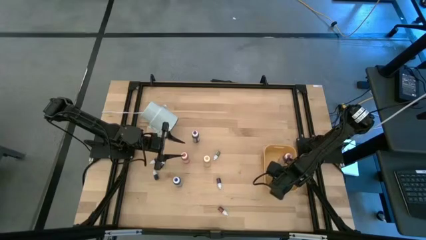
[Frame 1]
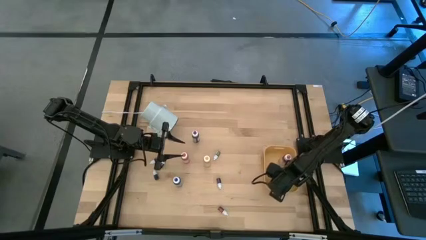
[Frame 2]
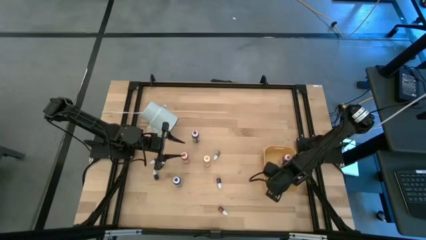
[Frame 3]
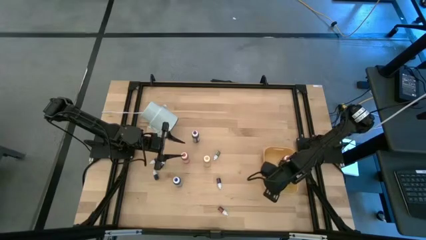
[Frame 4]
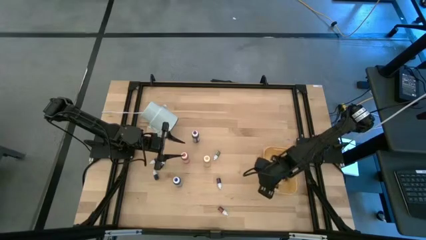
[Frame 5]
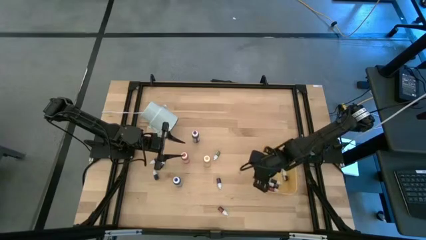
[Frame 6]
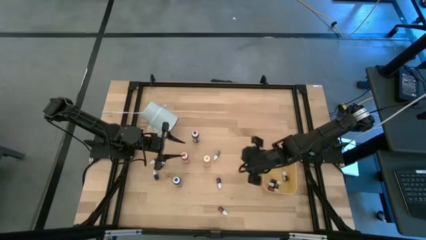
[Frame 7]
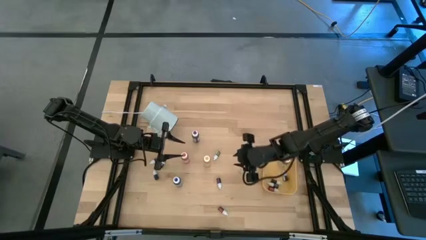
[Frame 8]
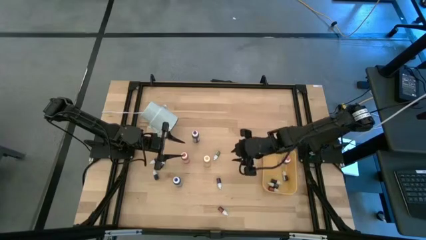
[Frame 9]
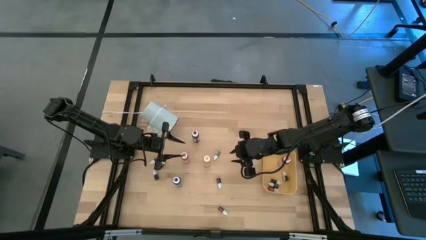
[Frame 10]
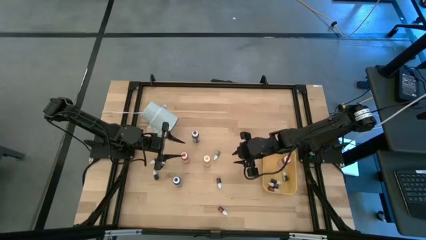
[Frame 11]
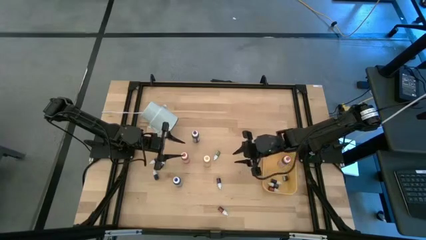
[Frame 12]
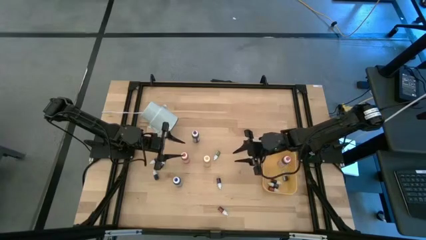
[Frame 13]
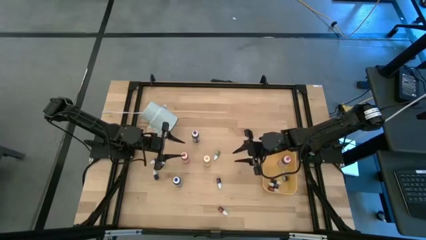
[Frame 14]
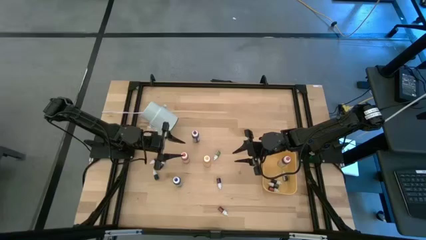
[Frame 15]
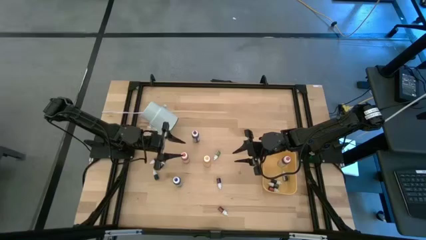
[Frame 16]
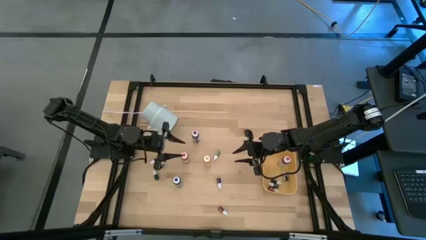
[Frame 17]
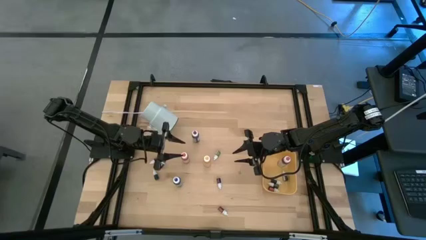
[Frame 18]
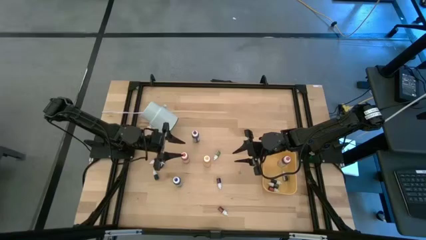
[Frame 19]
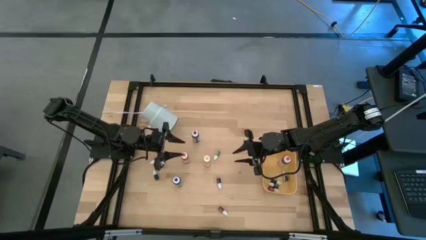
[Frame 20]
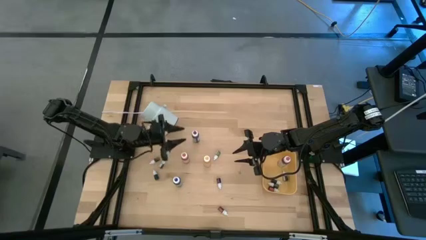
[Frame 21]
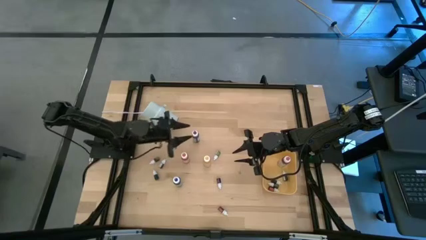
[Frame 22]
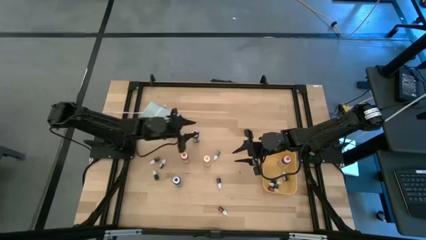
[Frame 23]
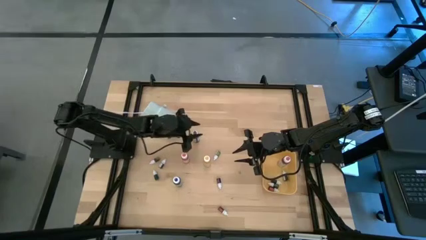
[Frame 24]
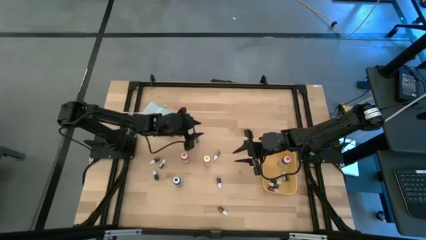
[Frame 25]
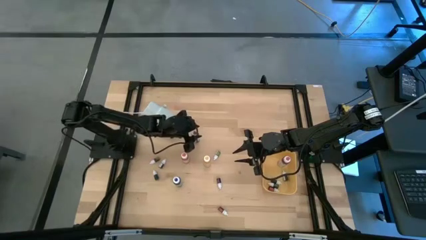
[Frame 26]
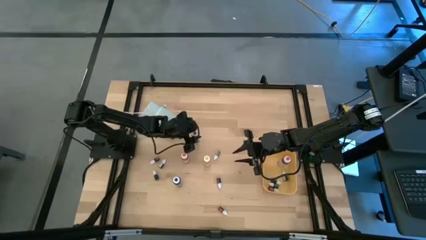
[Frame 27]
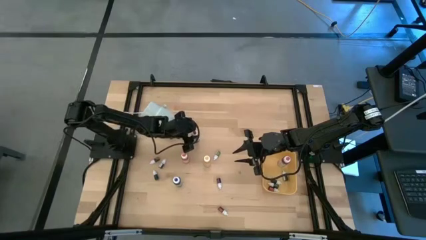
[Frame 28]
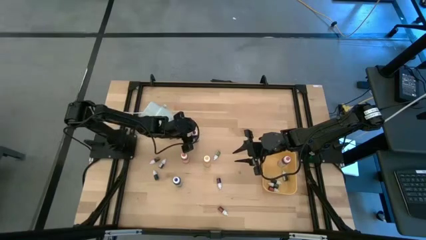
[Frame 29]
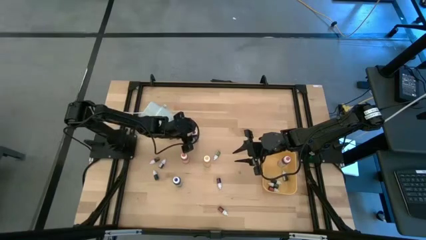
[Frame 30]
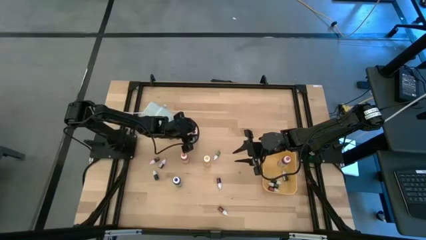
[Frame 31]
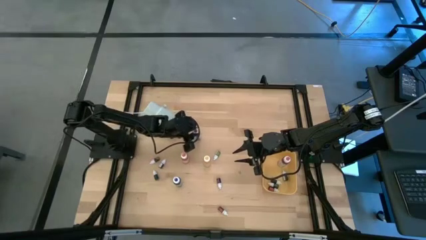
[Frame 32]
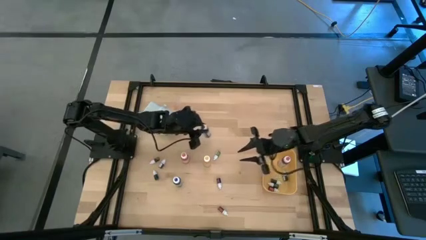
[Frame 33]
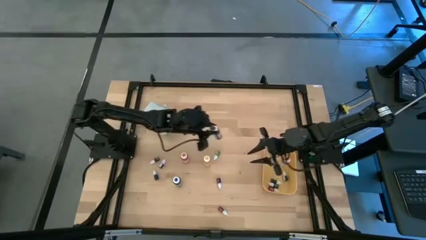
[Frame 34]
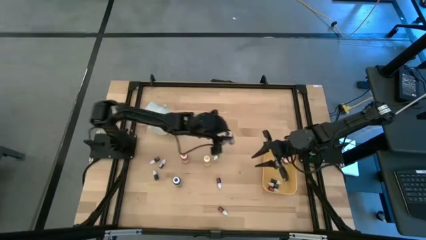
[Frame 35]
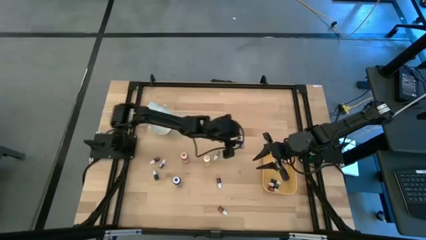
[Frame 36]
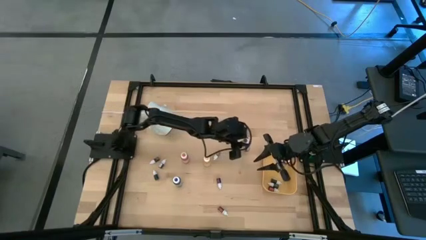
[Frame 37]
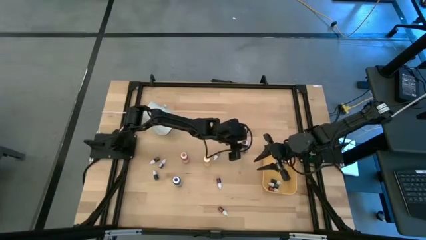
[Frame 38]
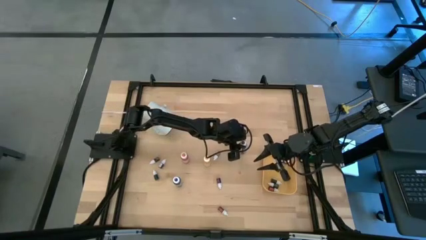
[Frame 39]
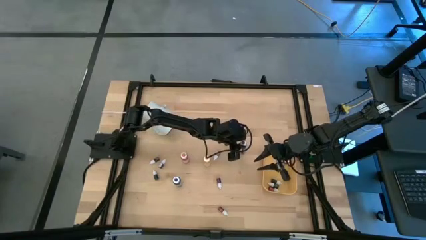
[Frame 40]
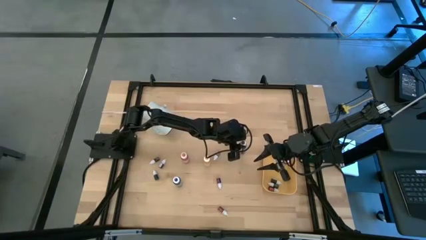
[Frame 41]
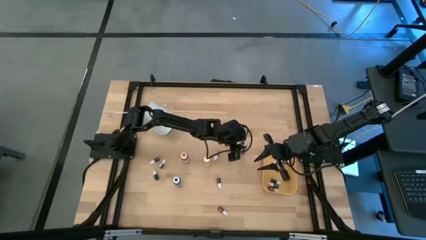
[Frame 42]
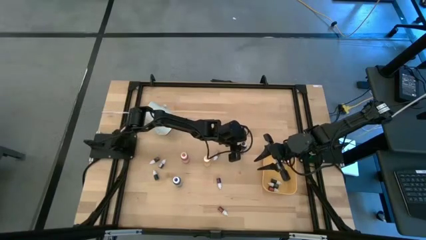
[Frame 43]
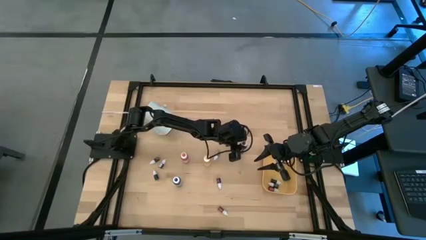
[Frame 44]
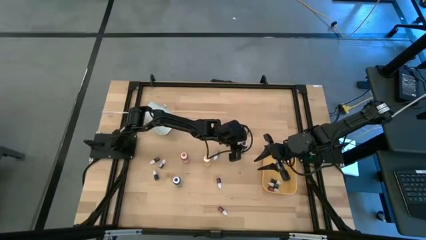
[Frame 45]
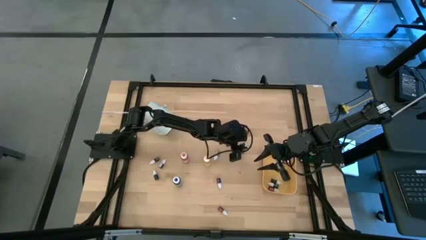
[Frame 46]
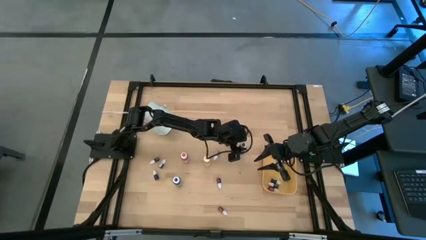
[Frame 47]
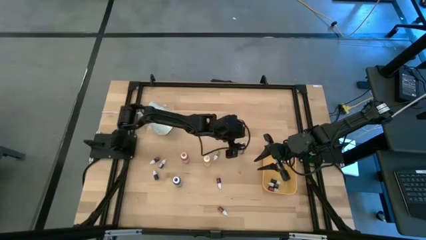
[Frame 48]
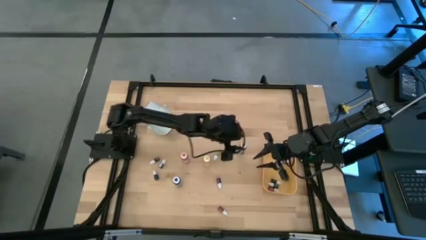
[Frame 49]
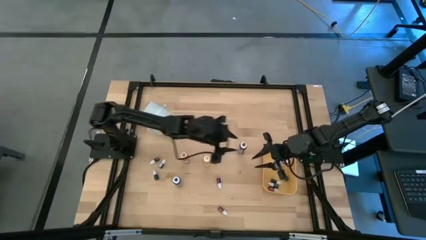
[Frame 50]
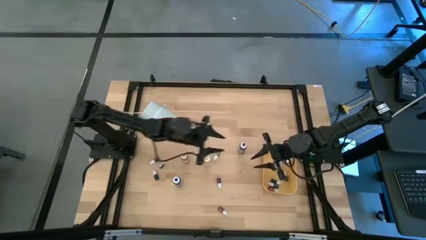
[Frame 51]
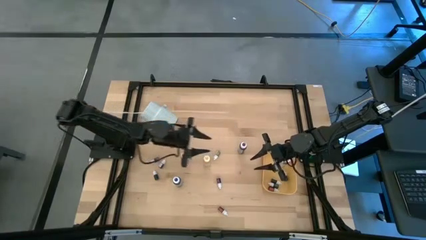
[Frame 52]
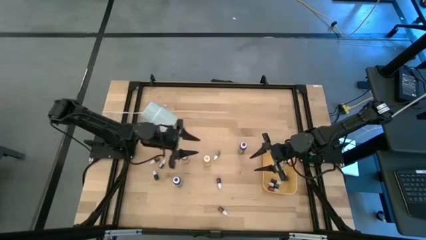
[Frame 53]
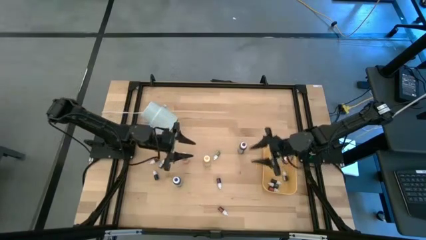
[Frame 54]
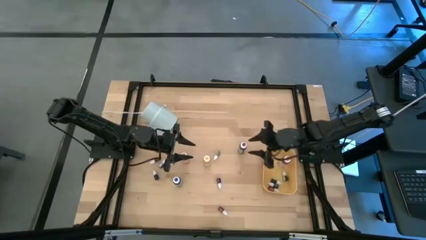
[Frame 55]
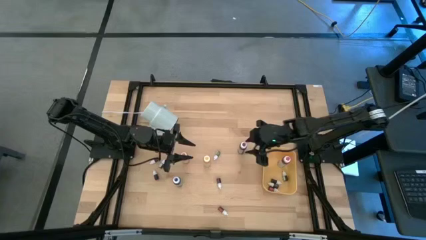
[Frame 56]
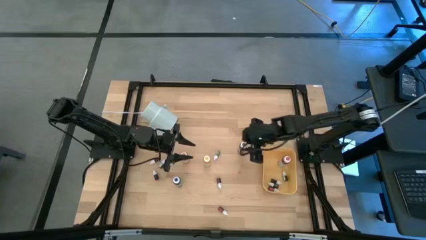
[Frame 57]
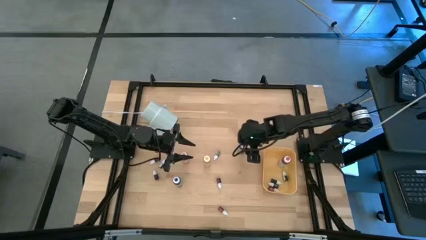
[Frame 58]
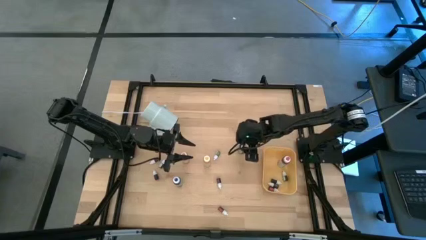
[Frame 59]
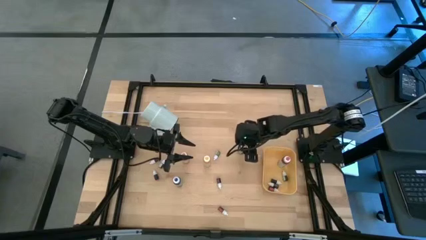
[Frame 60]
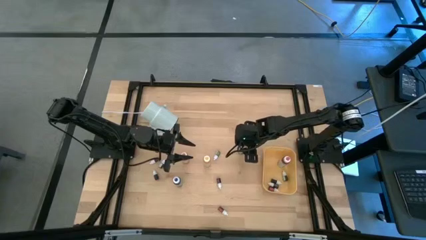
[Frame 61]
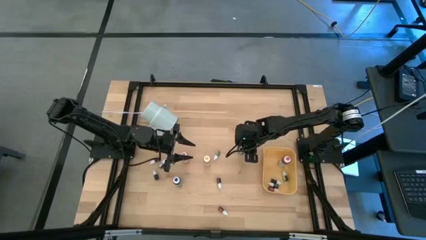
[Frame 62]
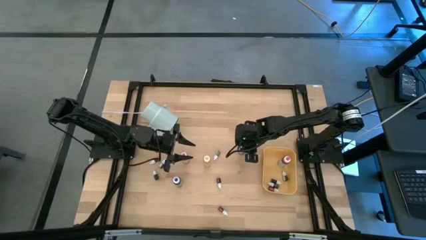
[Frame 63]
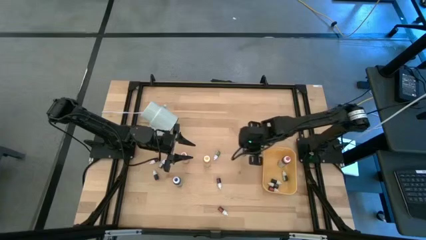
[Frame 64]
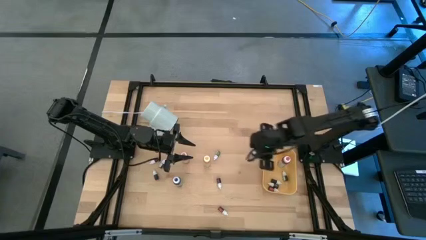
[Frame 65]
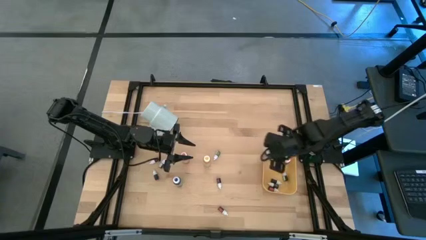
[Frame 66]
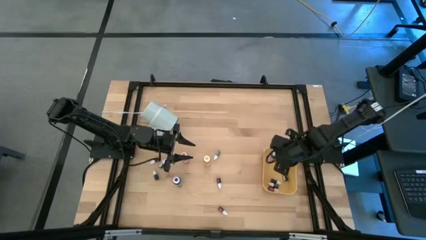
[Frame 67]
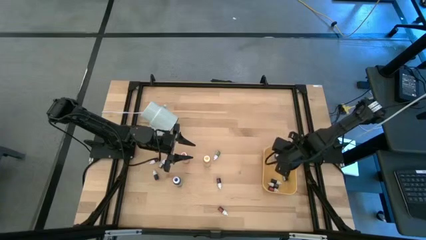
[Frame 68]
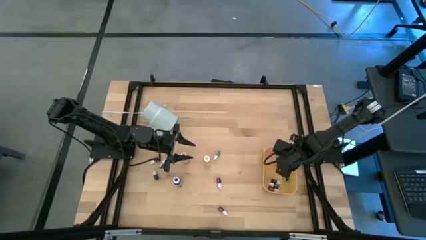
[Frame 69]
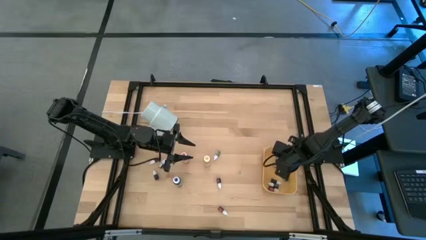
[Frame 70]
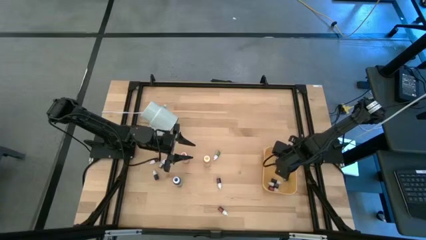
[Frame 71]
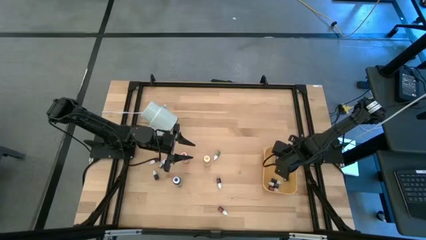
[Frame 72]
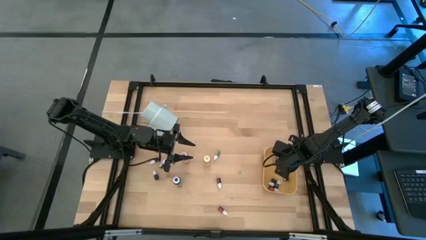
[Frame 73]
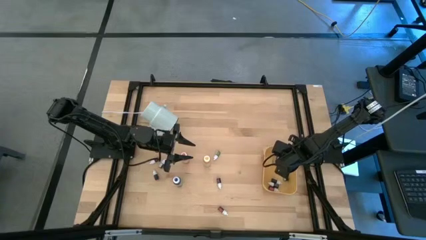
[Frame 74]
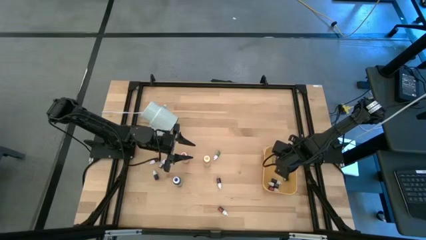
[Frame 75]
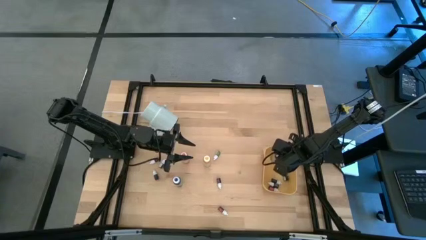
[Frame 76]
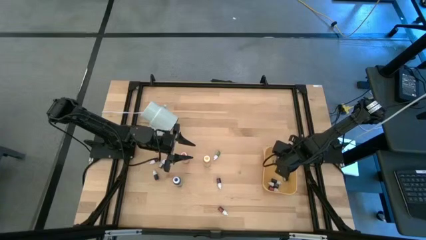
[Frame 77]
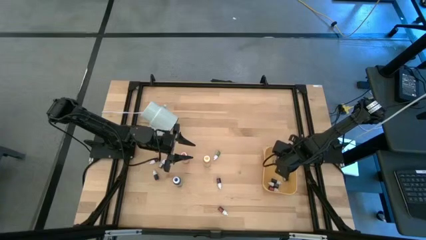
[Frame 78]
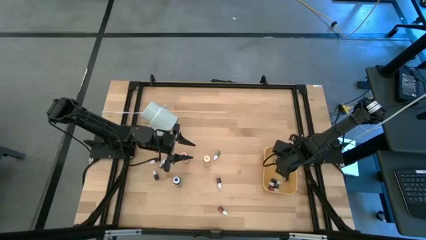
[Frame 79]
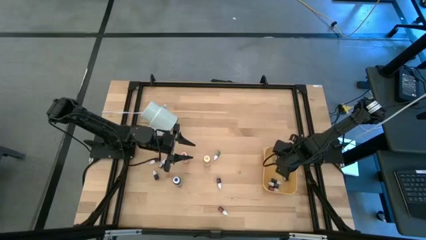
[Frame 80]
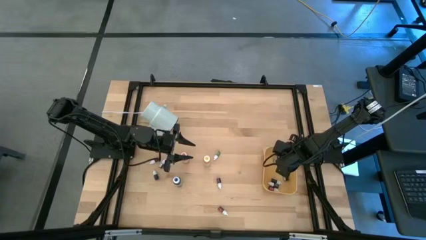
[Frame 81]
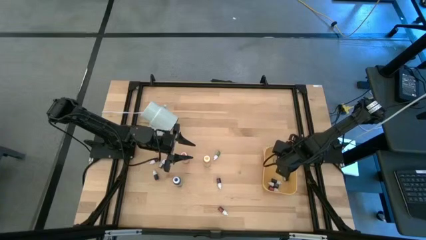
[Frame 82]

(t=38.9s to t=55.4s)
Task: Pick & Place food coloring
Put the large purple food coloring bottle into the yellow bin
